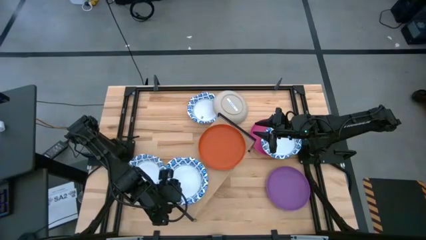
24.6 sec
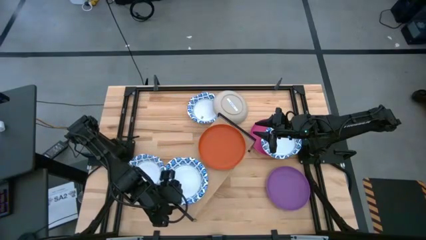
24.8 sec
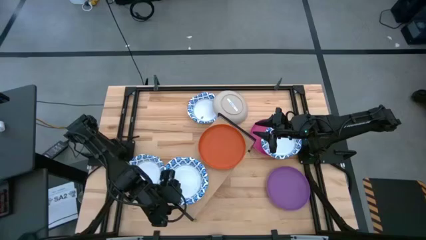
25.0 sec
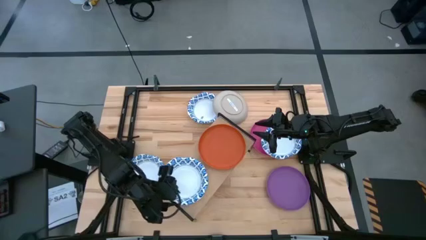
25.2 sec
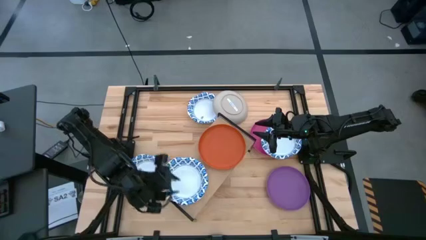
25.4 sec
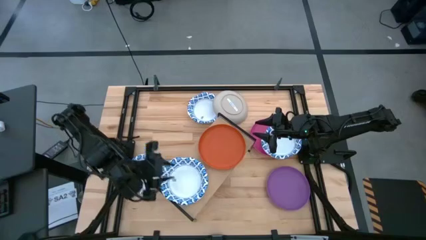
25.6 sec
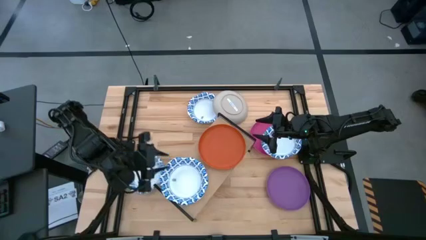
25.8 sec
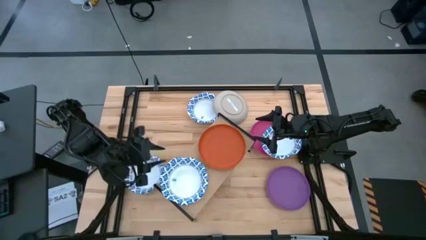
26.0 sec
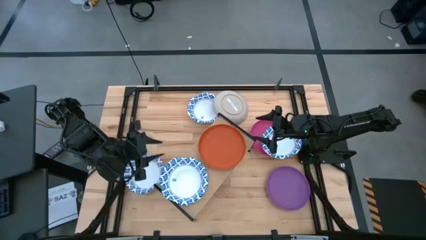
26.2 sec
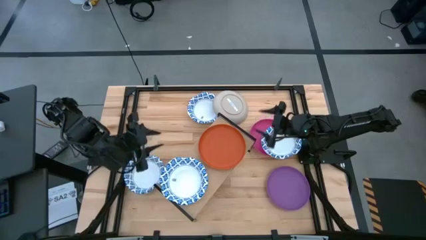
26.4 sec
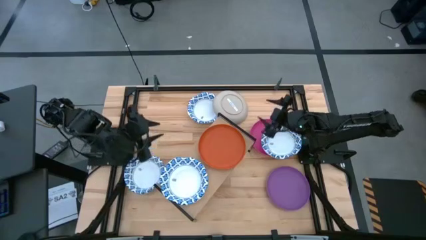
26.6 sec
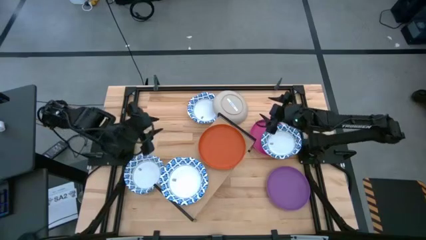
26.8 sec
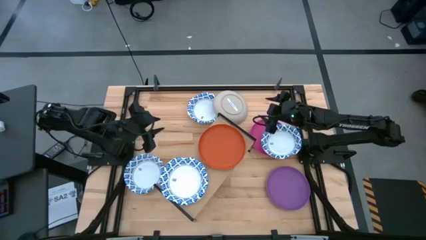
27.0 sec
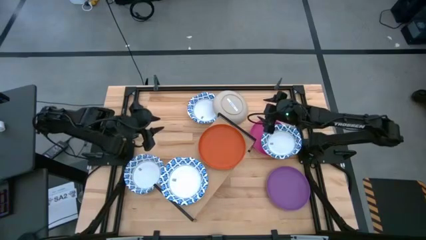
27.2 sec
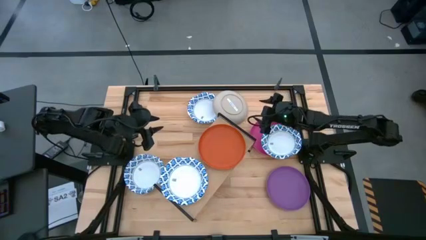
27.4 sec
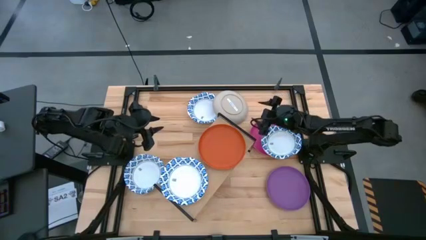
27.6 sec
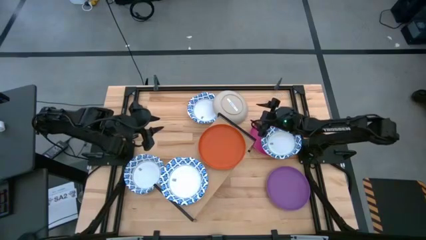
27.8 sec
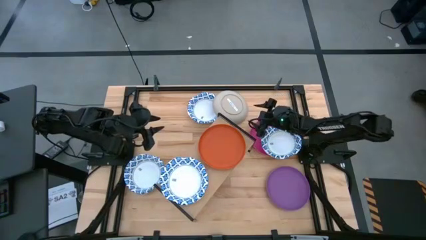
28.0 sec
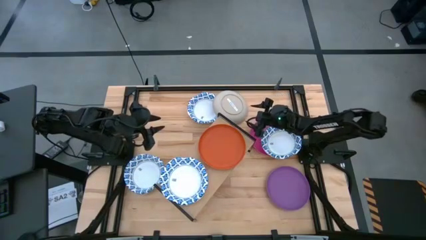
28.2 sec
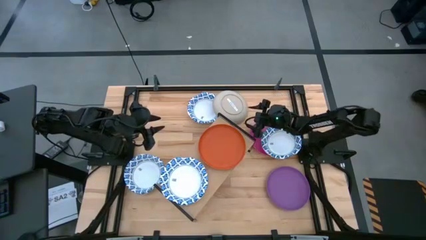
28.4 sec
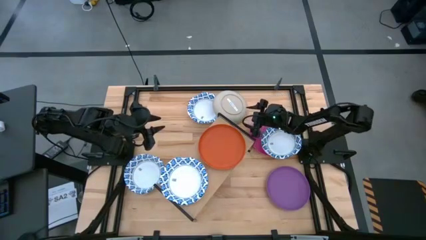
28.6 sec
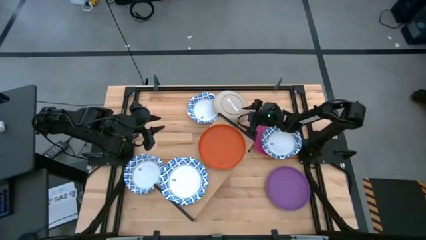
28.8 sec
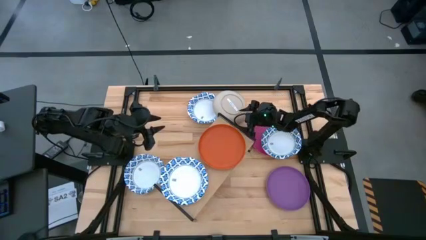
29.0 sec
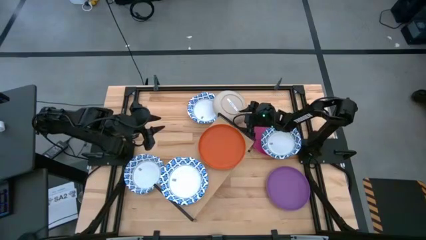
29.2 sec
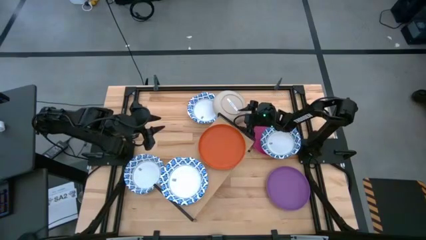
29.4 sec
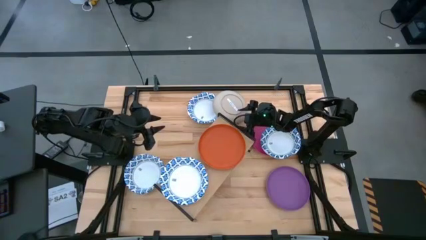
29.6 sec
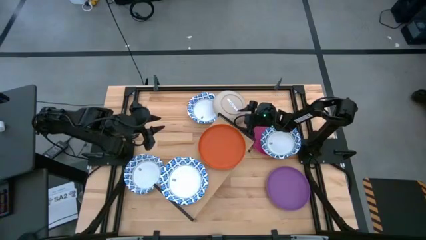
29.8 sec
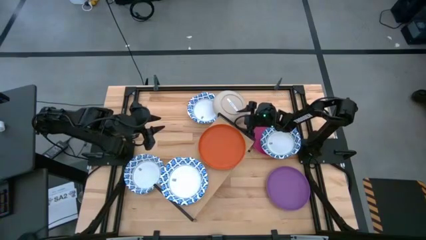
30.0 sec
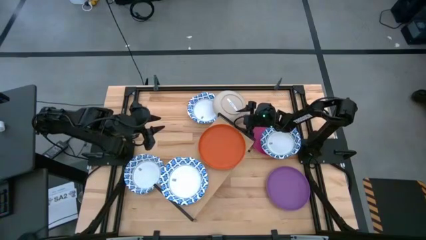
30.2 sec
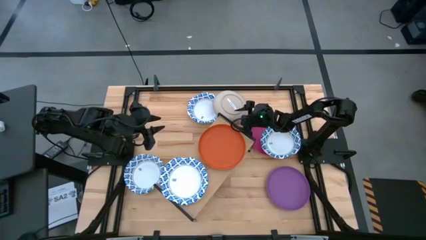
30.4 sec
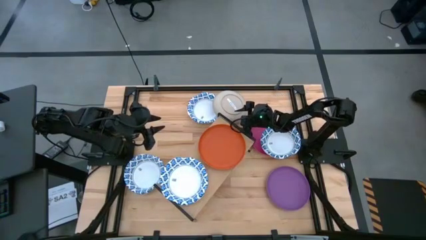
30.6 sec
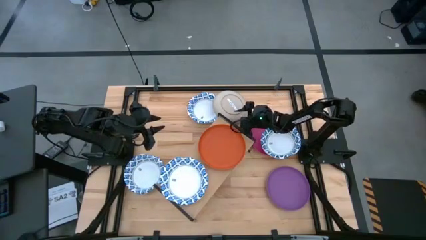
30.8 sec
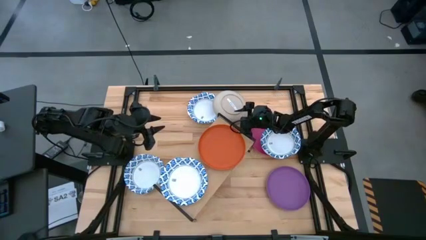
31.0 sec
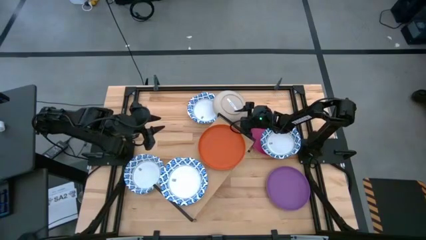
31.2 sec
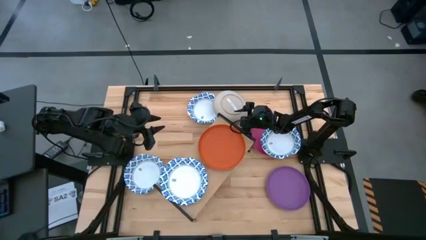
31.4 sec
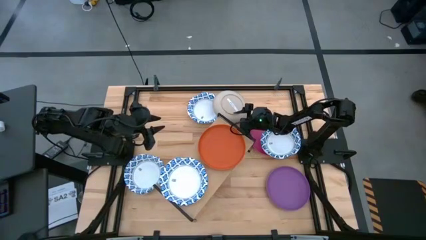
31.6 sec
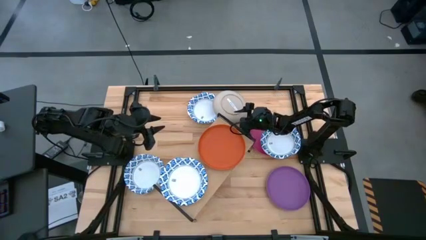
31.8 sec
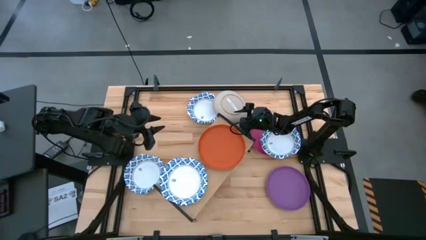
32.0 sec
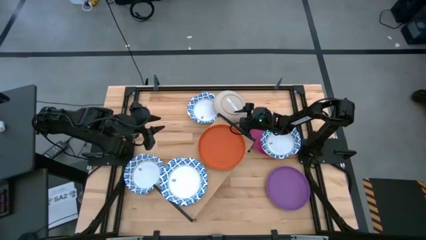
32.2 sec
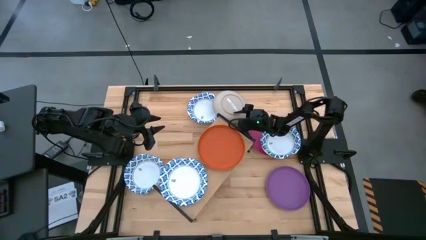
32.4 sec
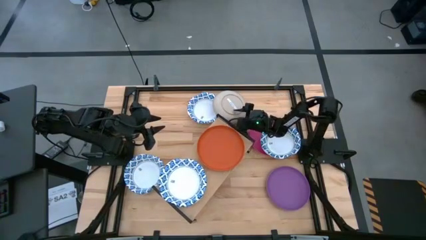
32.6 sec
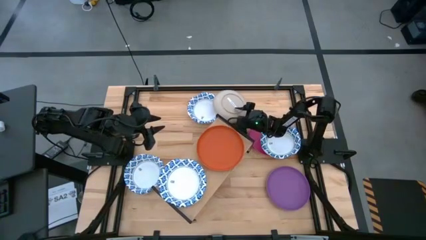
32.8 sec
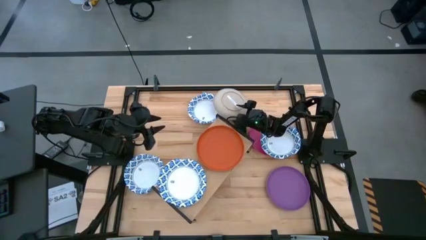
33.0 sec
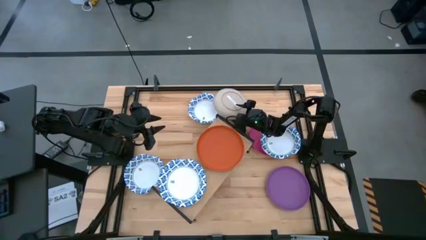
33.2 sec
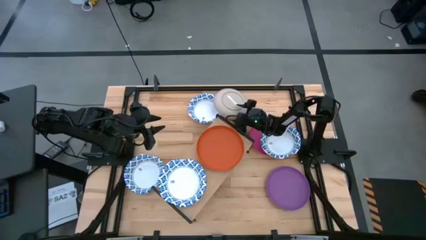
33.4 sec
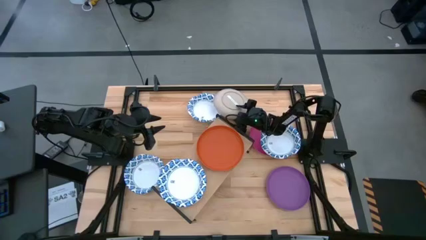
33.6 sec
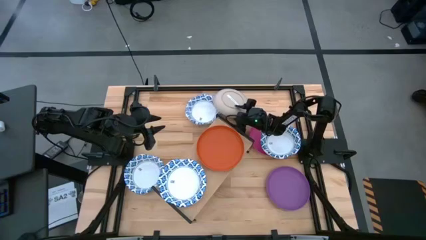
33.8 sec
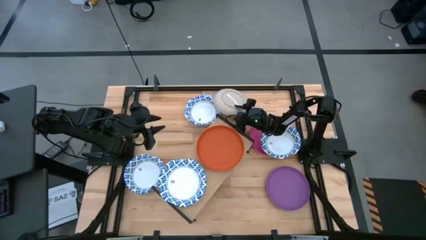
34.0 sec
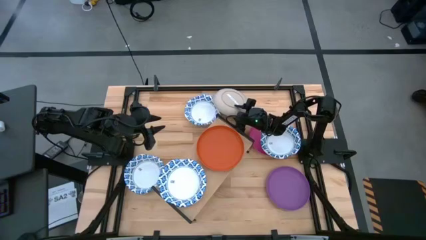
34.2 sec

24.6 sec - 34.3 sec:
Task: Place and stack plates onto a shelf
Stack the gray plate on top of the orange plate on the shelf

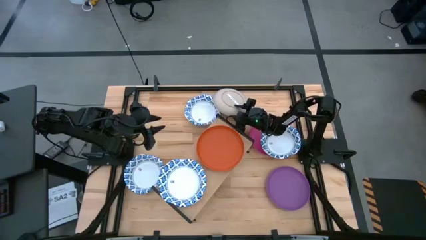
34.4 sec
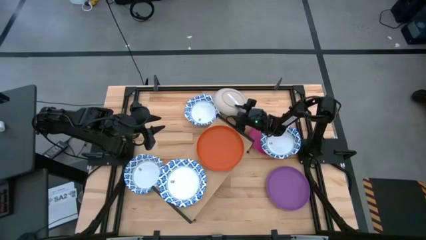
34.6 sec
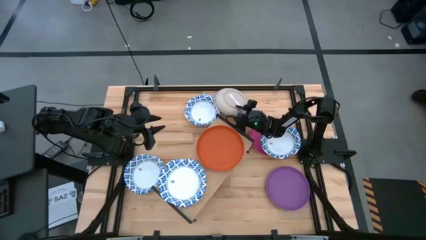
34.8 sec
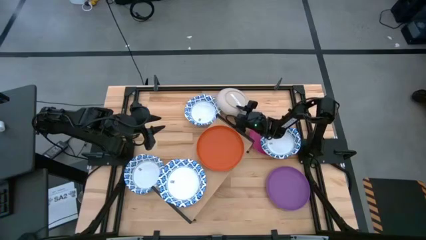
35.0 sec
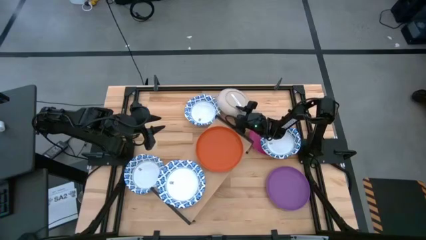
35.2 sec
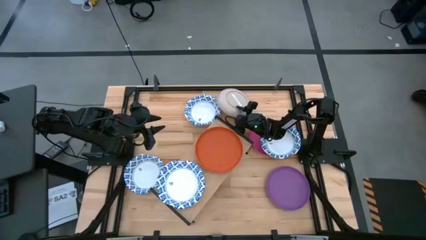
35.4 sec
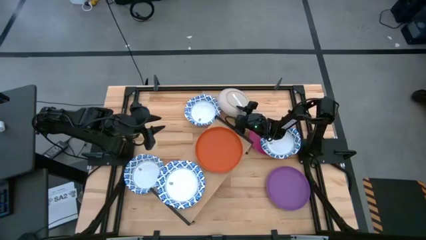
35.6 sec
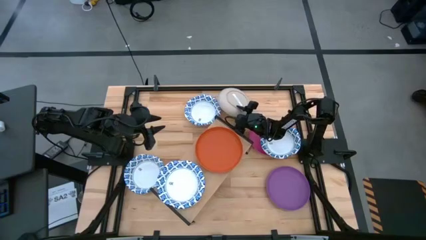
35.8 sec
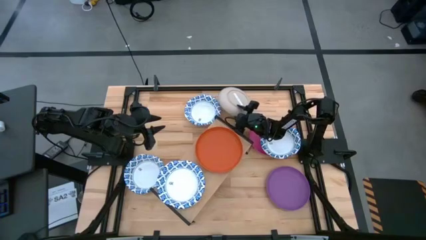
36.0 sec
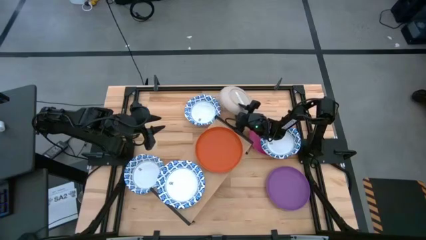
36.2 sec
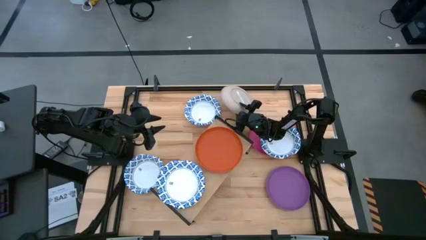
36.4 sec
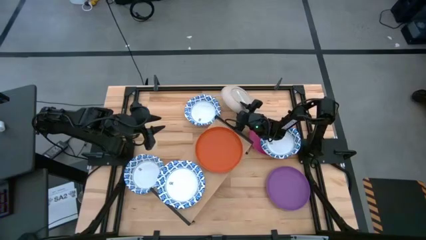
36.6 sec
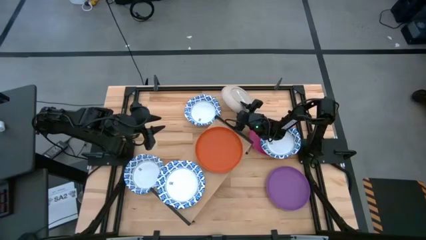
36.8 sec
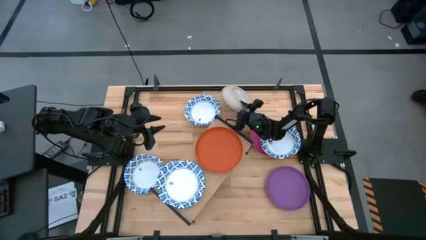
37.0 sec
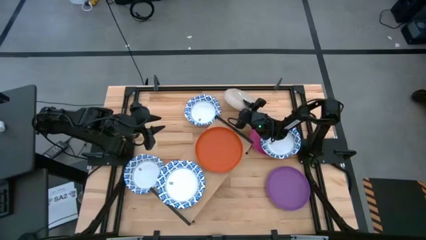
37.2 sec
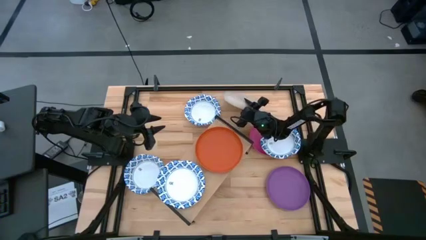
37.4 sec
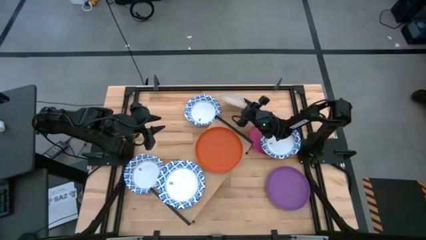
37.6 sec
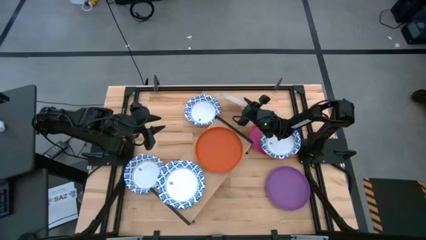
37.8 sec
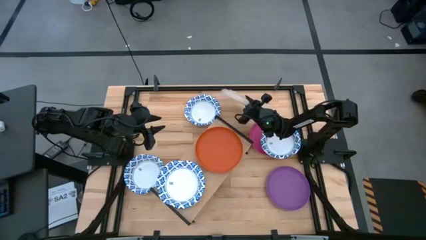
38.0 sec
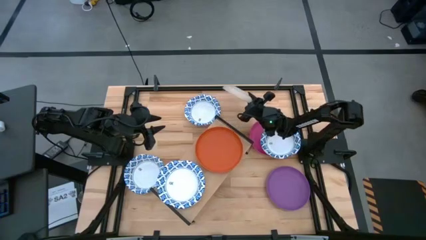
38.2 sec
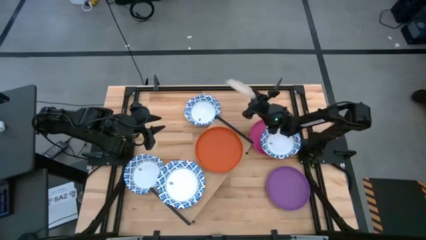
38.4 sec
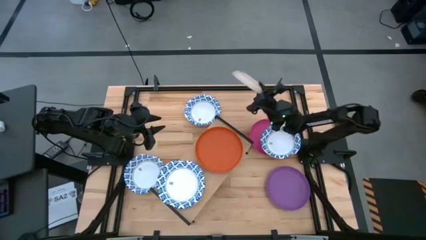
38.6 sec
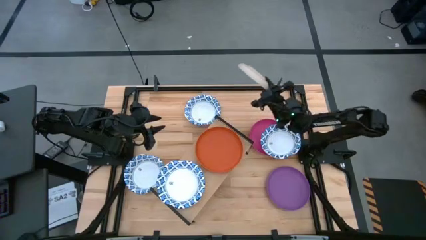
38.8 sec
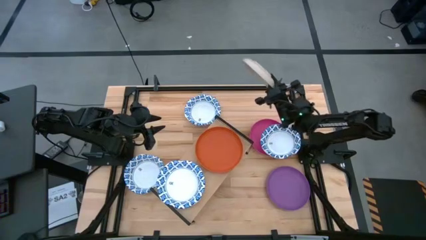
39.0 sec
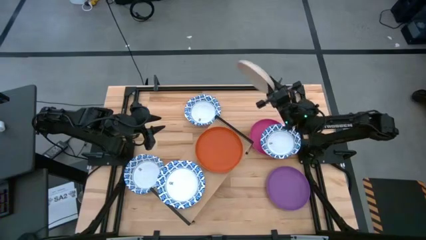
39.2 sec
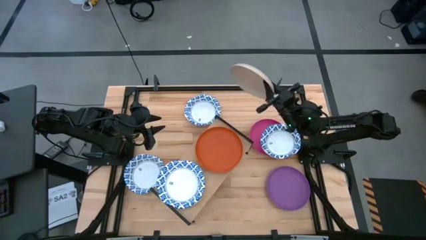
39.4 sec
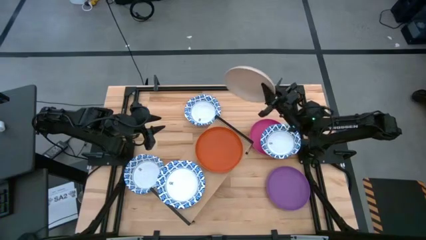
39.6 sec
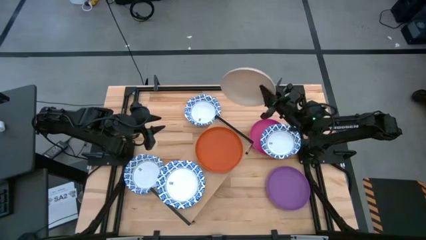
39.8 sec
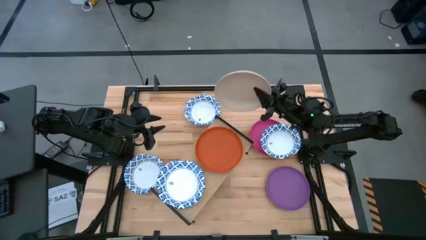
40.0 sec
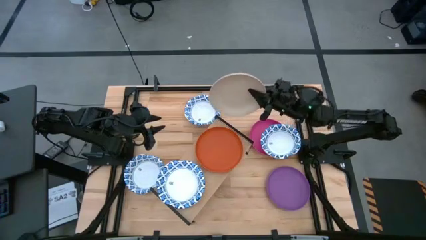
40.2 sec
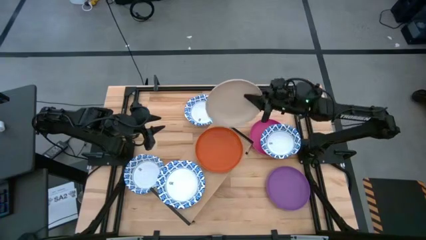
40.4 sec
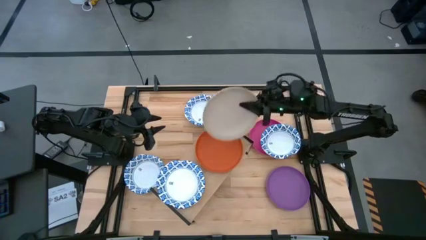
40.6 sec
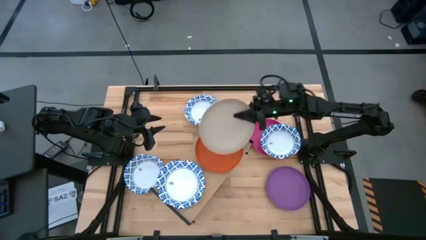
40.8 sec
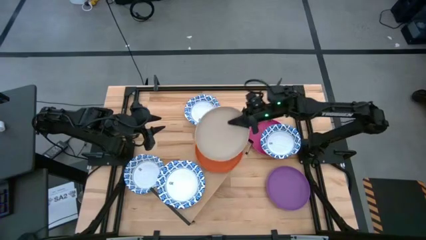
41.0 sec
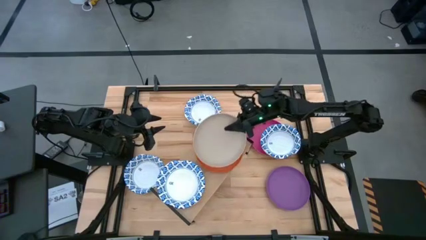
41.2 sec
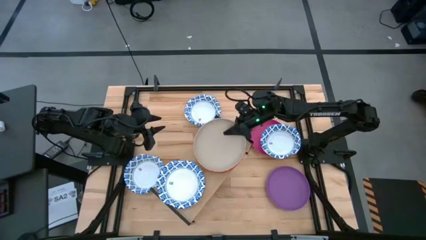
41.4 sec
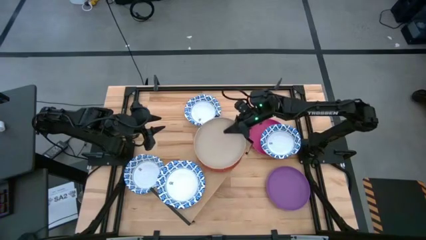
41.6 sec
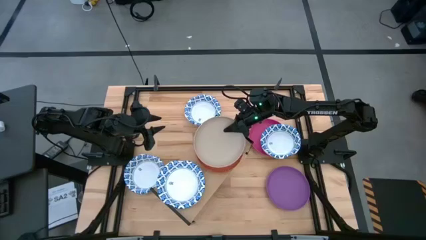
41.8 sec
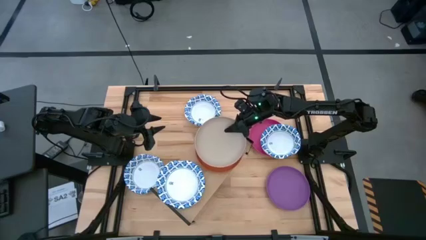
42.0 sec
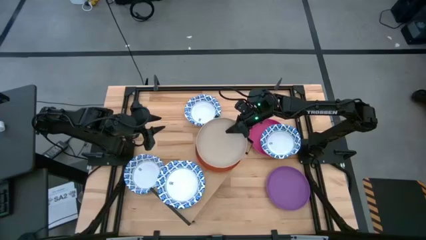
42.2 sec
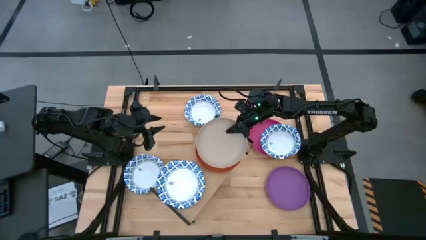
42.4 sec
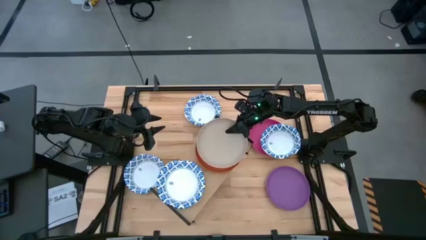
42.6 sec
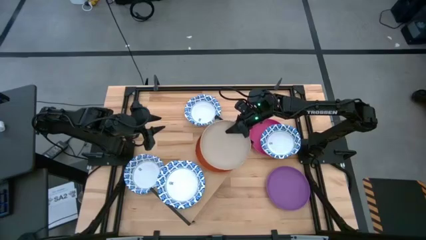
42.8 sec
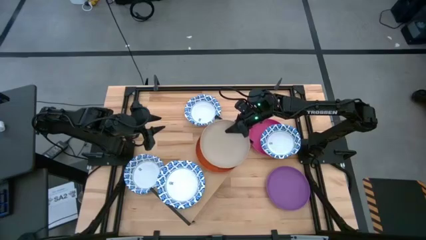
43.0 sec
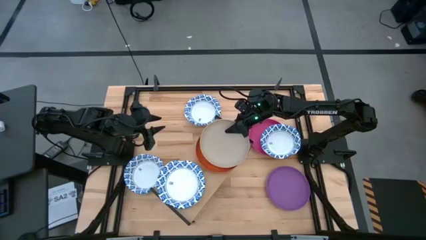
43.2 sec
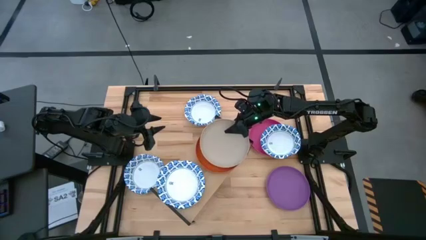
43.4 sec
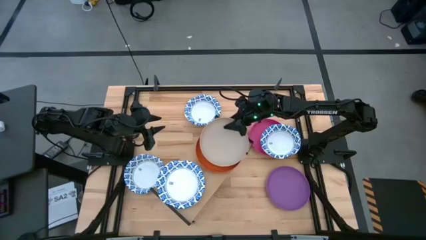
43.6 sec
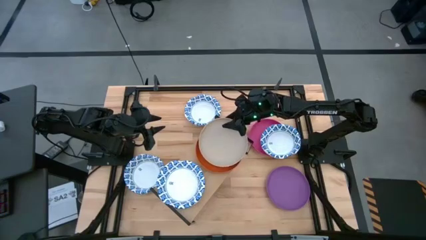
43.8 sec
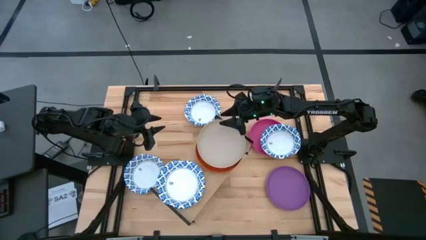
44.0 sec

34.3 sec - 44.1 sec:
Stack the gray plate on top of the orange plate on the shelf
